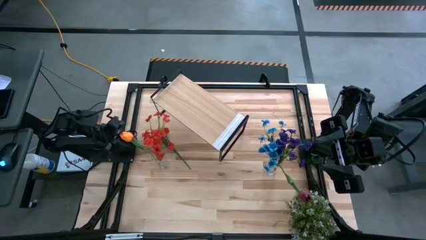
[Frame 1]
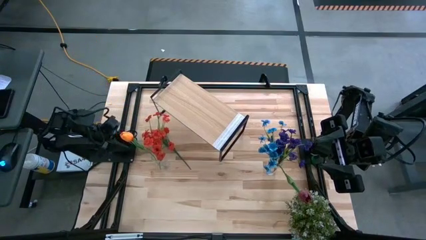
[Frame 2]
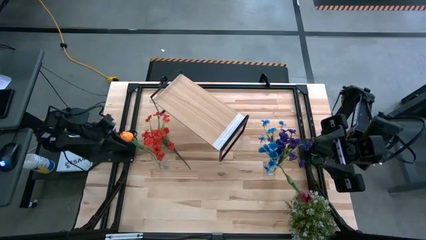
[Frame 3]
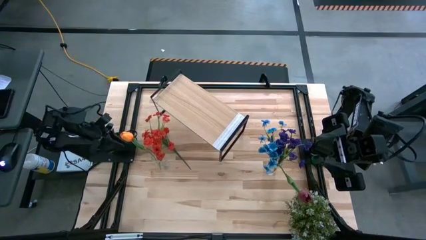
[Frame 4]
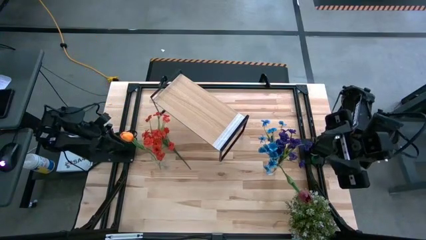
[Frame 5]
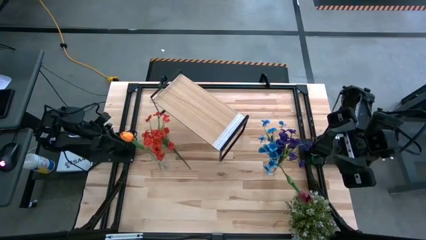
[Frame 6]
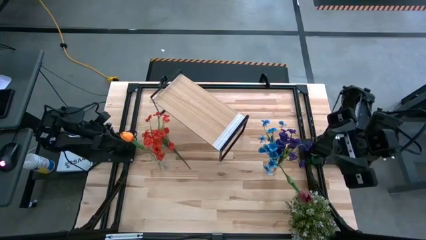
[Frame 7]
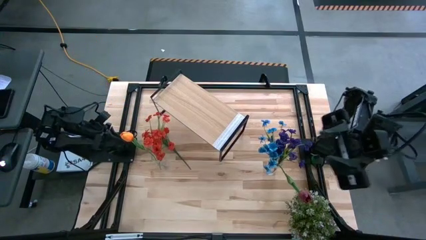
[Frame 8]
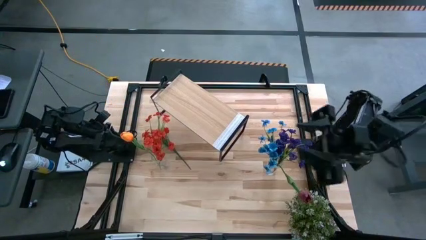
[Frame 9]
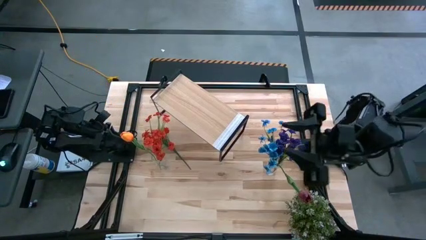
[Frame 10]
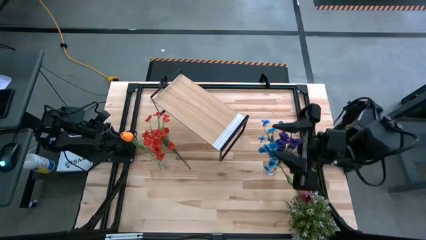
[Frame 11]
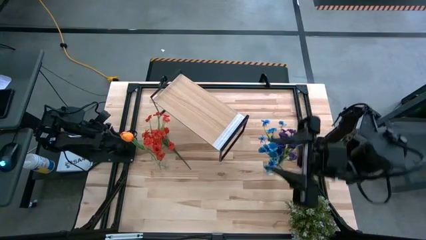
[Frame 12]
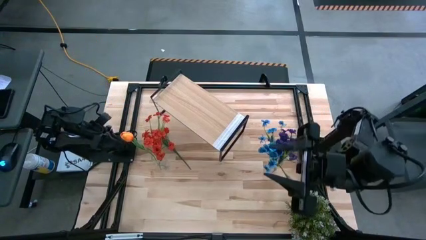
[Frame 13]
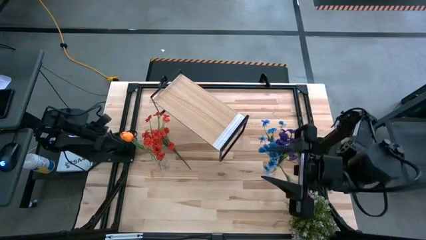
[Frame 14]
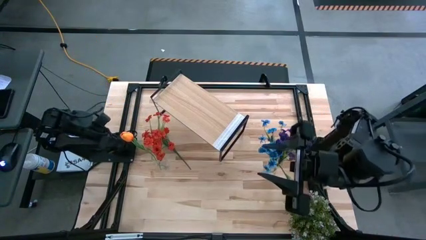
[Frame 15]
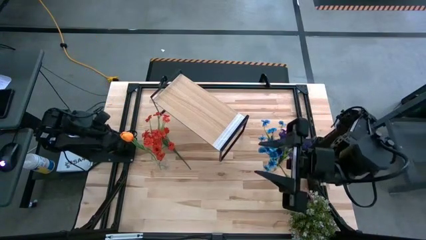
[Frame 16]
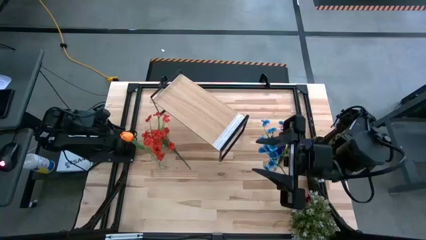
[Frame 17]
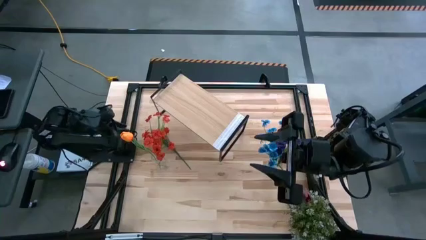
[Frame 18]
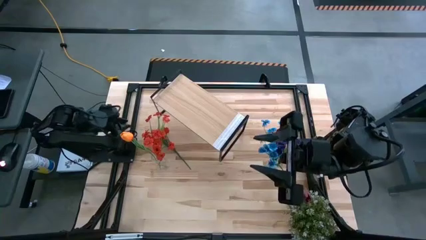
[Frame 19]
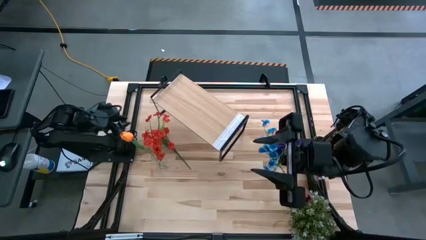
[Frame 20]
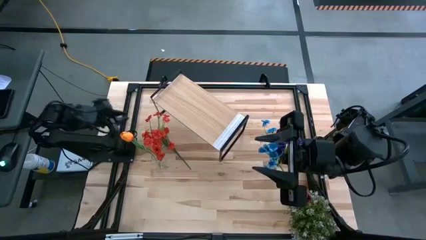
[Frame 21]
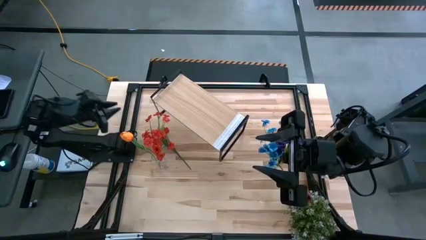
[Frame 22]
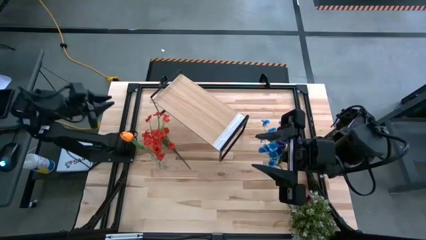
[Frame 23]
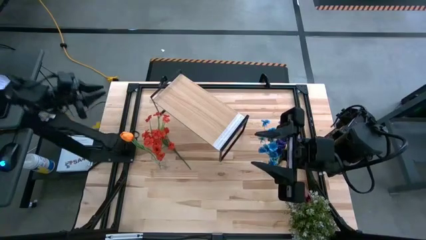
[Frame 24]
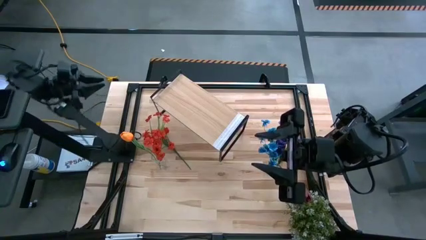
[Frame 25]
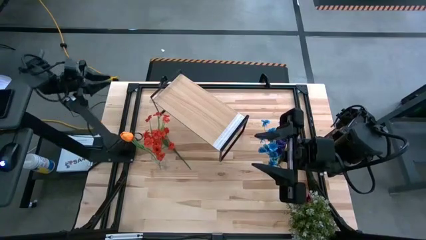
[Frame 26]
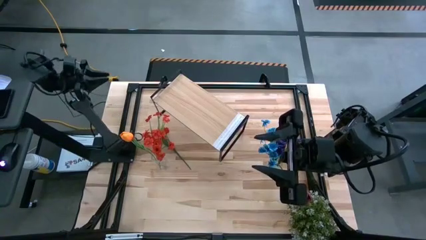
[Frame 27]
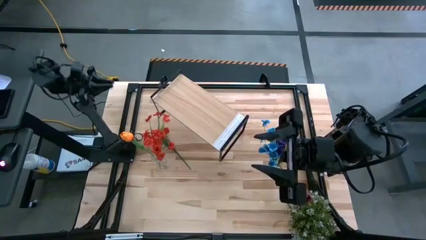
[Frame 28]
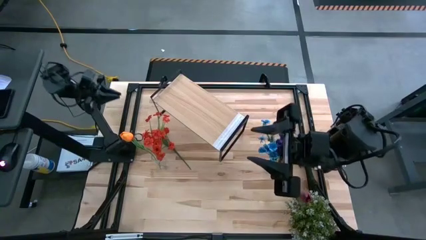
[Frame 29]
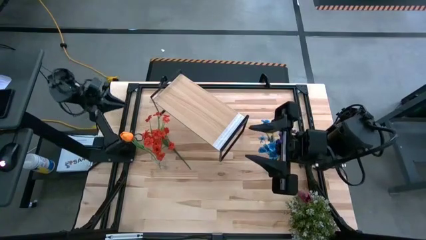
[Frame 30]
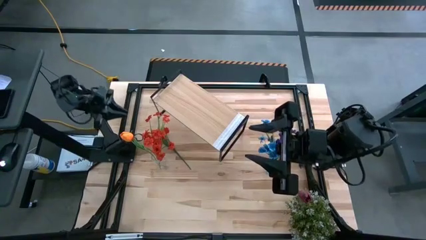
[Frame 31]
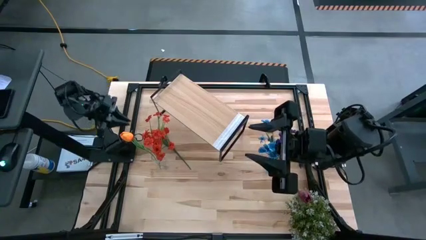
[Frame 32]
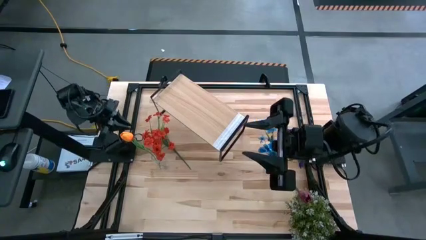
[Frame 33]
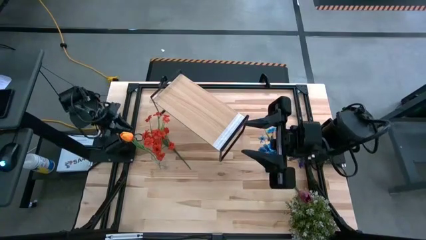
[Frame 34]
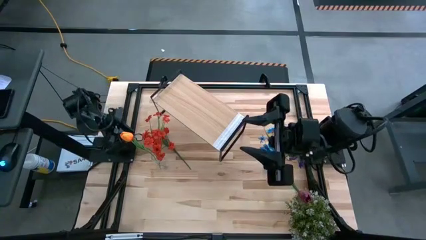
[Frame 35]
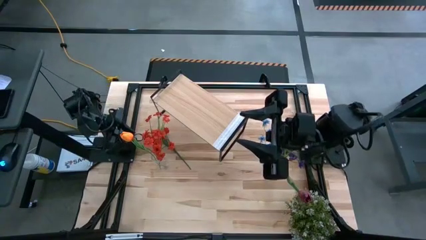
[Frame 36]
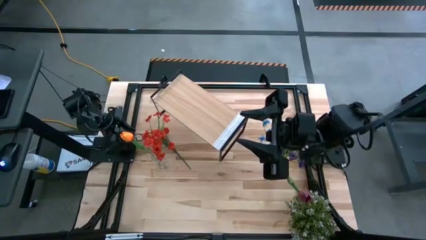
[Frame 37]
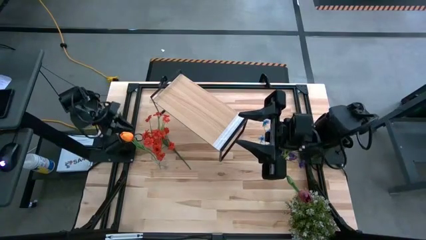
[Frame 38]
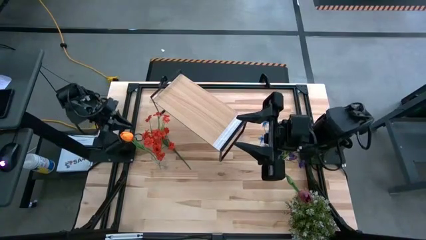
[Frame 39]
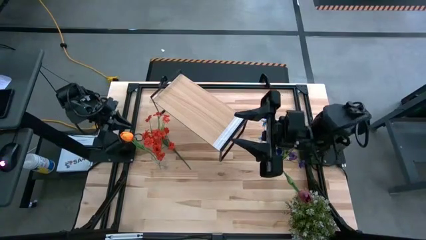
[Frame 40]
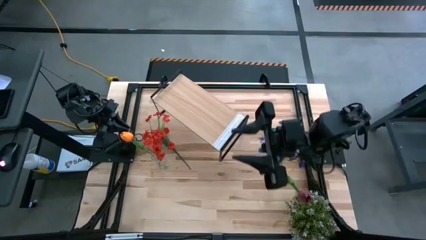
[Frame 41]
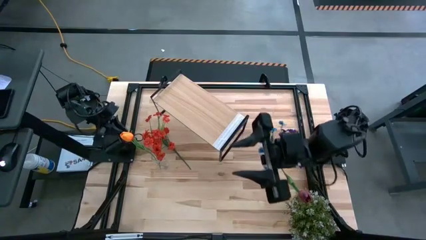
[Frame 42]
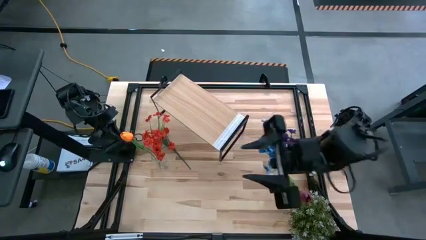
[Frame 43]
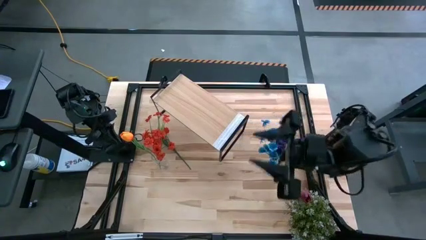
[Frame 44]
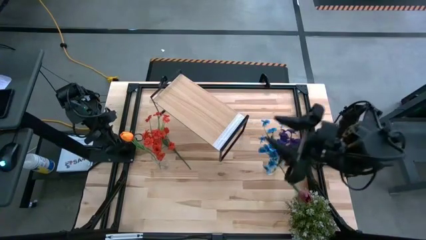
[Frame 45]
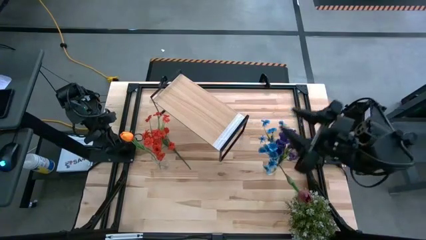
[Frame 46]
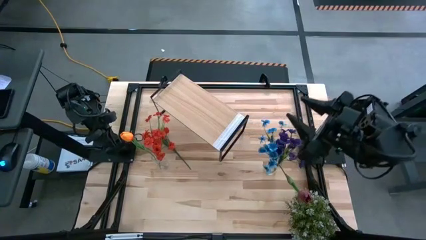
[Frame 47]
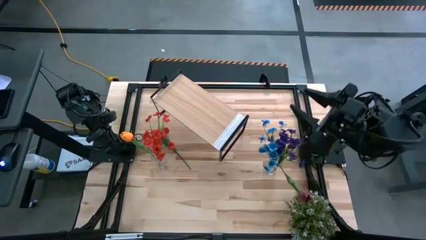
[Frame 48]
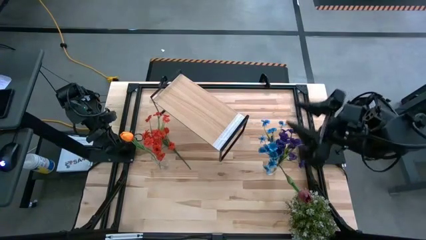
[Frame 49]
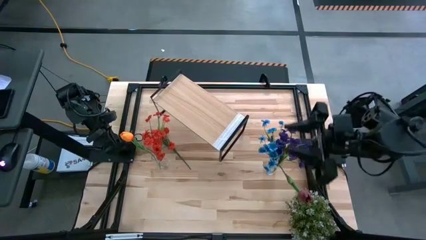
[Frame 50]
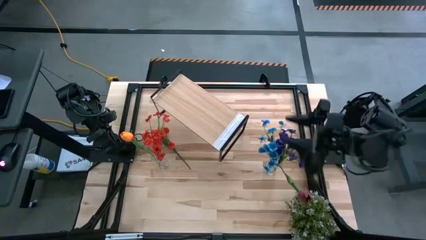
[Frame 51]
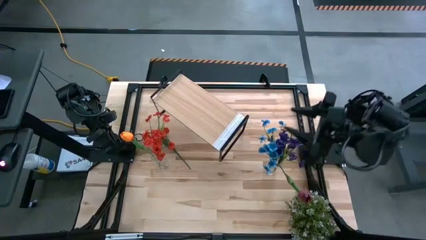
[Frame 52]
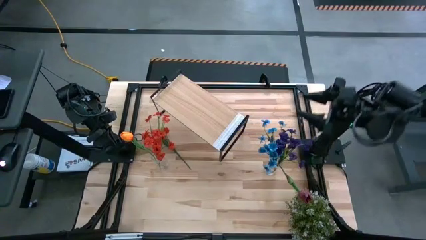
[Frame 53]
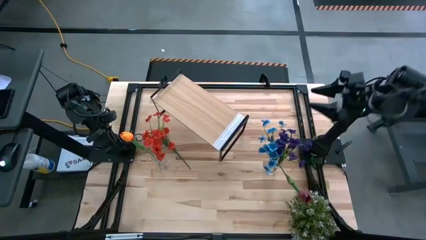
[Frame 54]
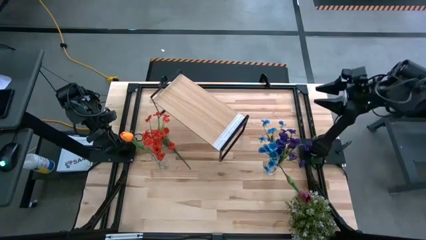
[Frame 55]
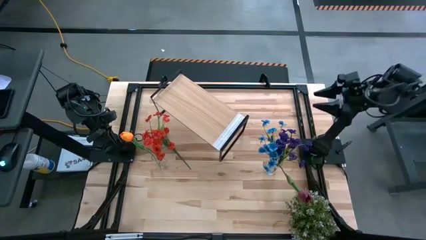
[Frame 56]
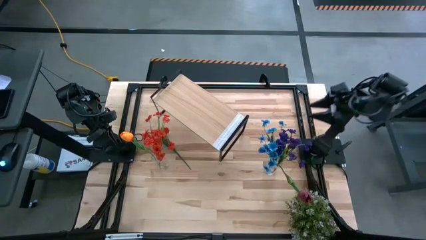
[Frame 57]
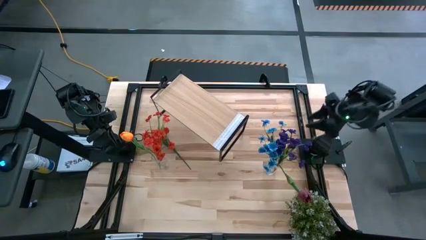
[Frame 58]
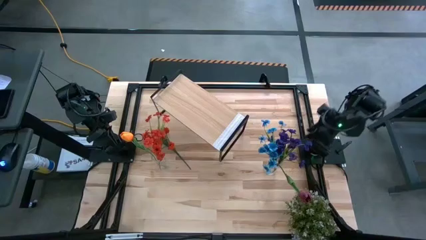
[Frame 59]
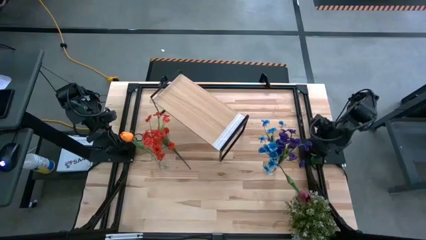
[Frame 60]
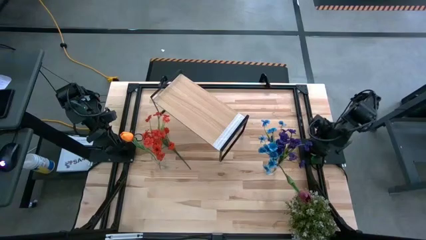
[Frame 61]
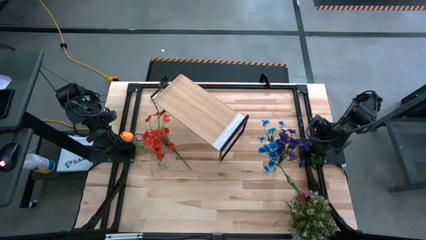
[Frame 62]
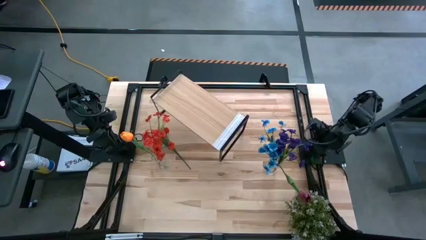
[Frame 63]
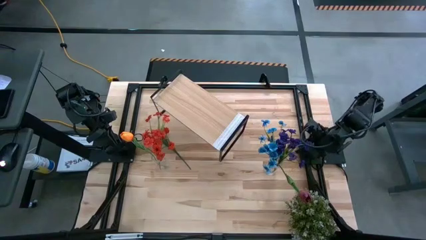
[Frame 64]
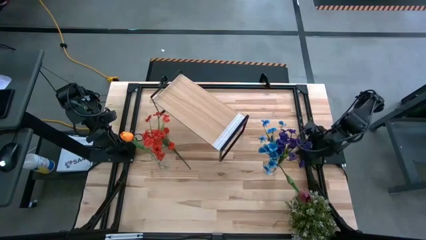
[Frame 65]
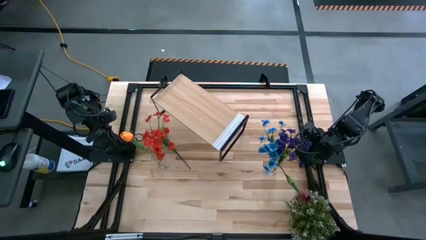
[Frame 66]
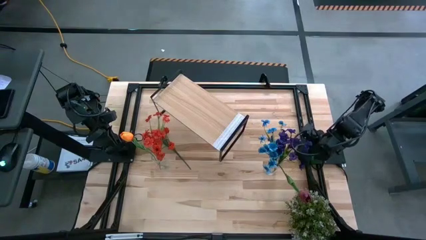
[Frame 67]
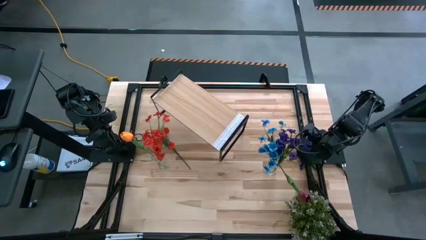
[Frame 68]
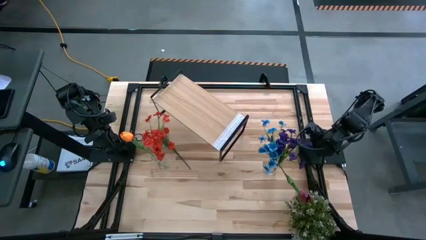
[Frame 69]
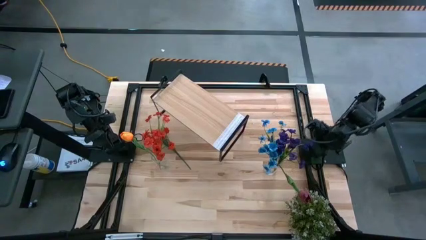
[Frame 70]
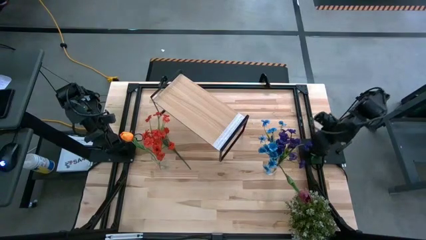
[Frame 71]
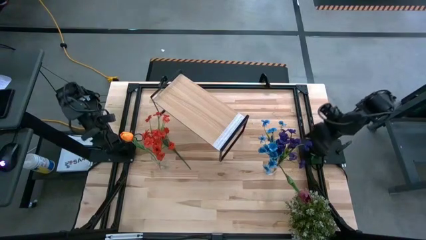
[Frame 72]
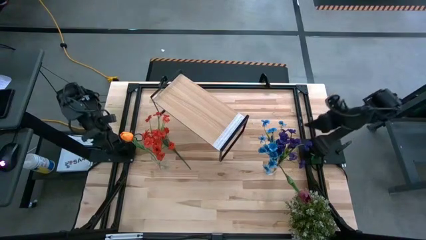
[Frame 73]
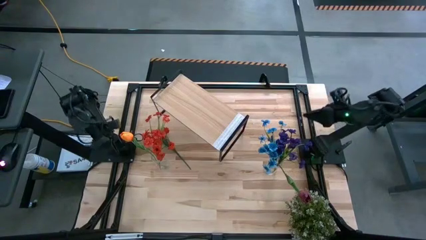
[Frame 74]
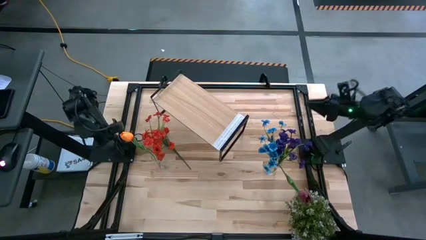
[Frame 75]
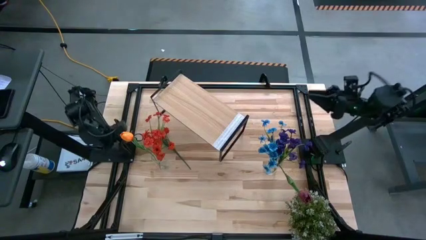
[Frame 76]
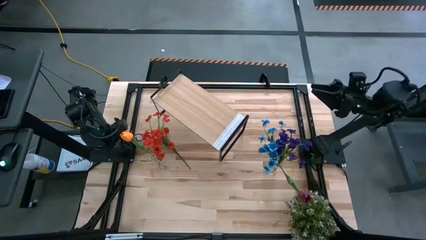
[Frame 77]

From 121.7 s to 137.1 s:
Task: Pick and place flowers into a vace then onto a shelf
Put the red flower into the left transparent vase

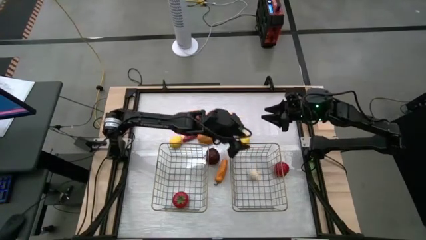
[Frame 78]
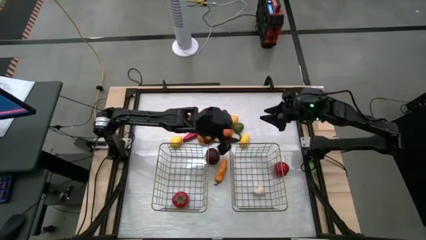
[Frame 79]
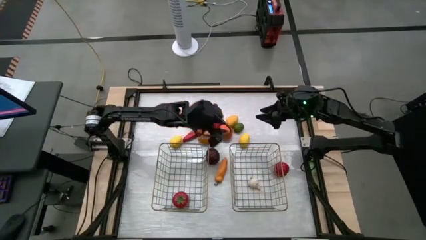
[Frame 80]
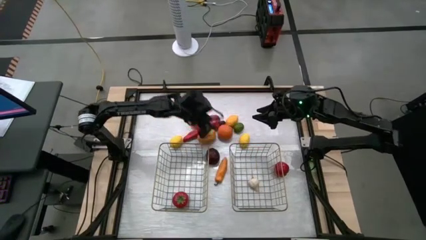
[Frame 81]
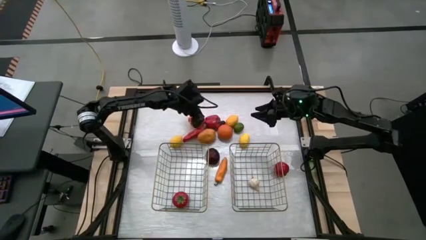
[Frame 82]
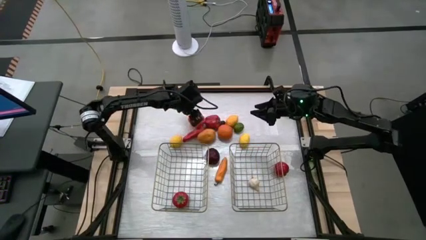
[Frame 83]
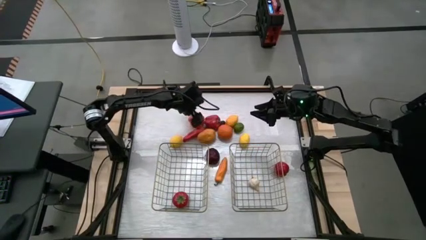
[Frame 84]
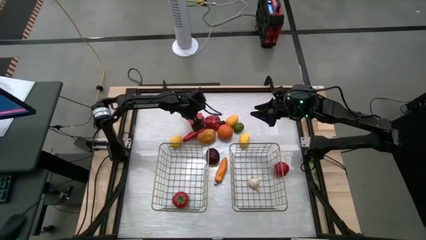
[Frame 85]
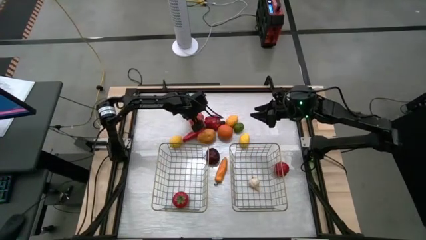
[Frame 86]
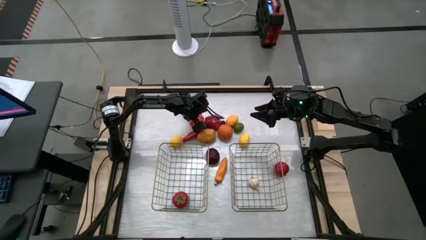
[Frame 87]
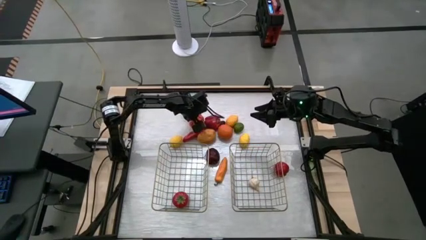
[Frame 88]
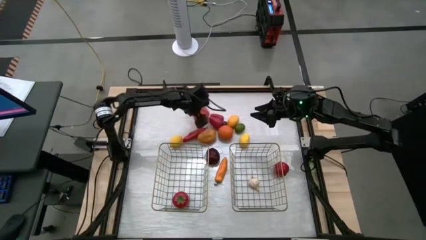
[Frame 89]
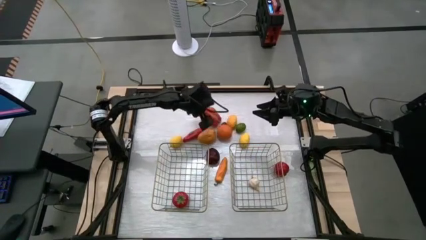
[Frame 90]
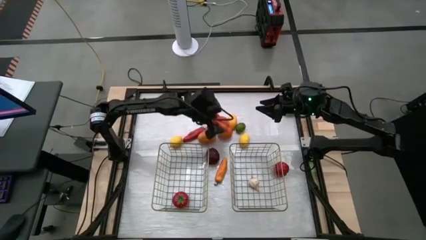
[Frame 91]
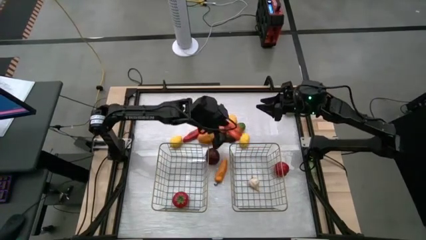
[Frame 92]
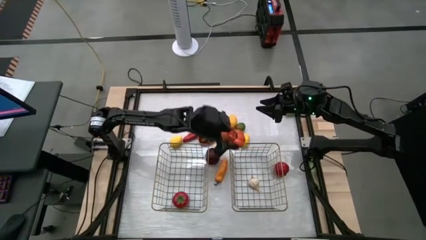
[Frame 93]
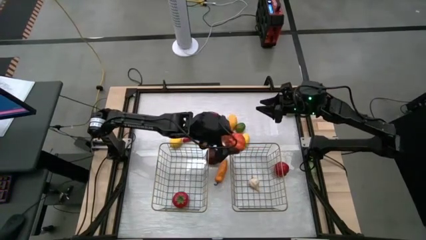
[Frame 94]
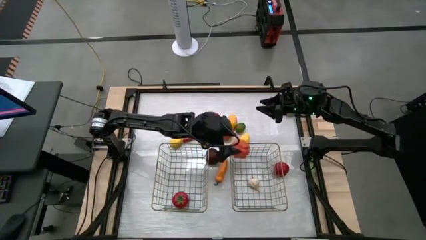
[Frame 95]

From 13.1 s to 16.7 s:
Task: Sort produce into baskets
Put the pumpkin into the right brown wire basket
